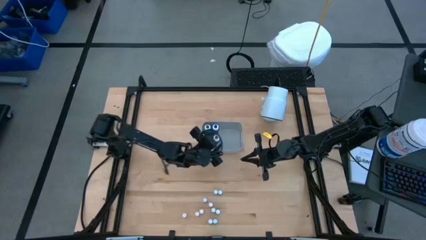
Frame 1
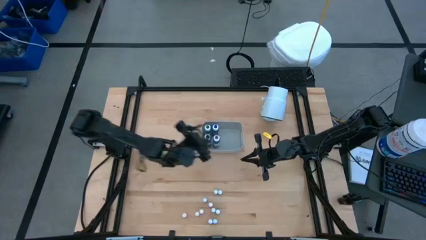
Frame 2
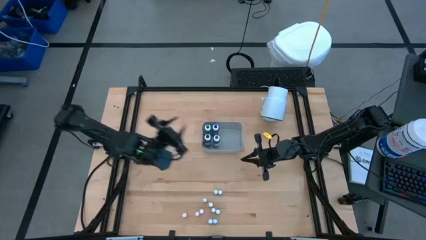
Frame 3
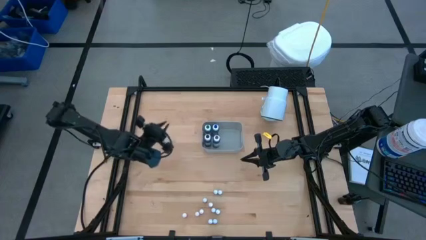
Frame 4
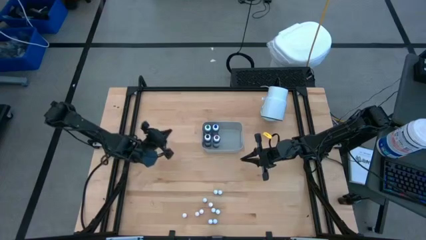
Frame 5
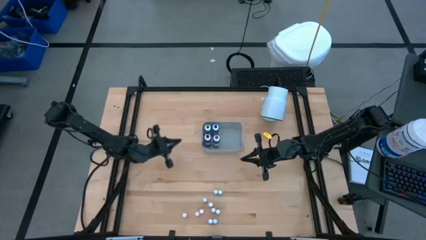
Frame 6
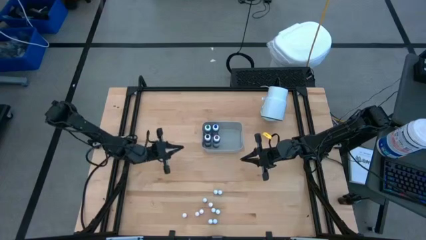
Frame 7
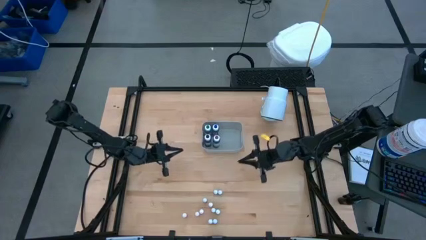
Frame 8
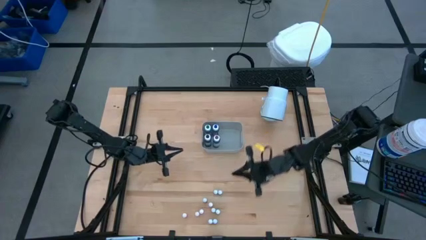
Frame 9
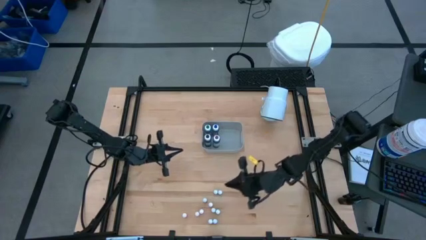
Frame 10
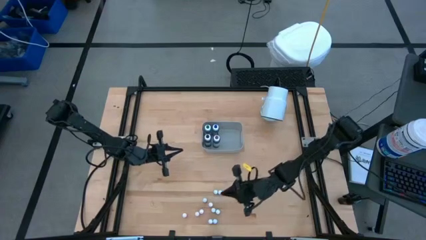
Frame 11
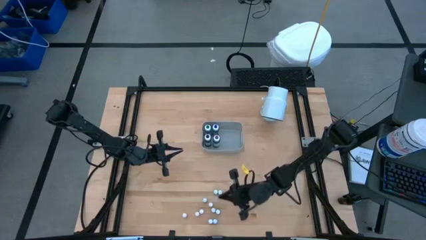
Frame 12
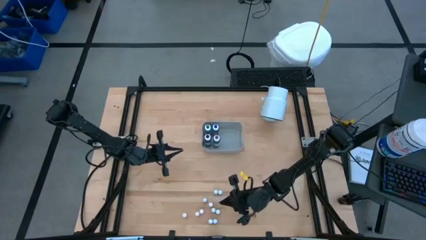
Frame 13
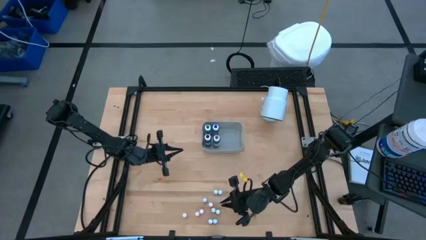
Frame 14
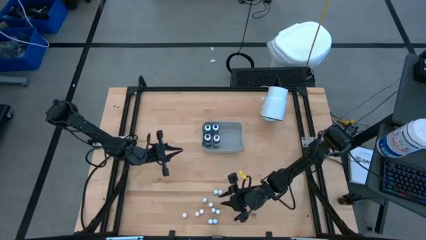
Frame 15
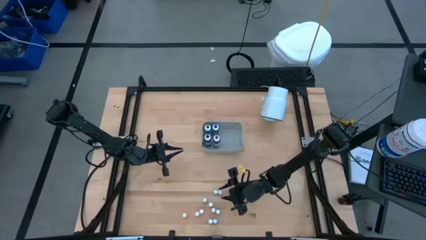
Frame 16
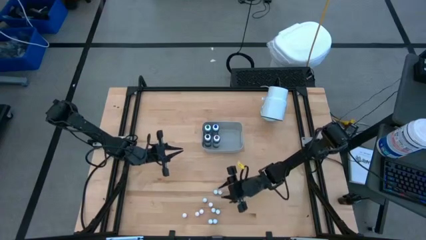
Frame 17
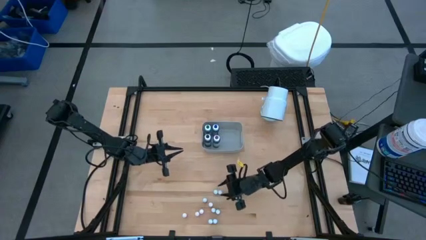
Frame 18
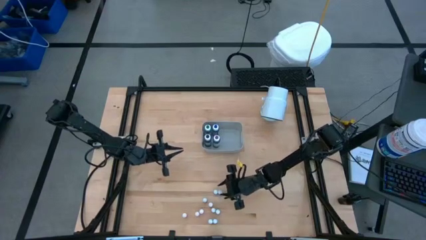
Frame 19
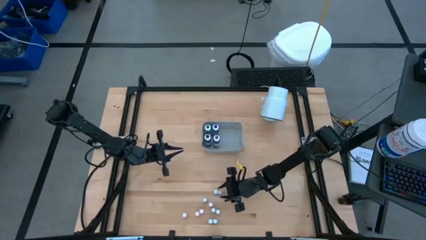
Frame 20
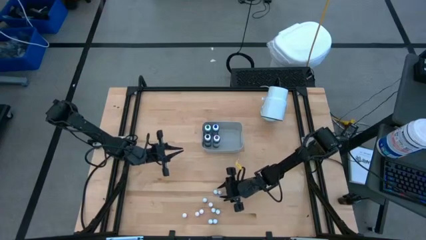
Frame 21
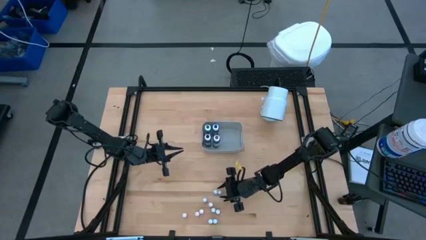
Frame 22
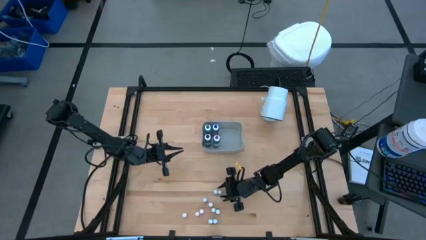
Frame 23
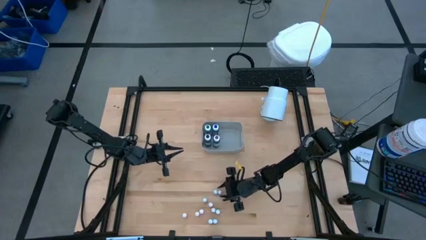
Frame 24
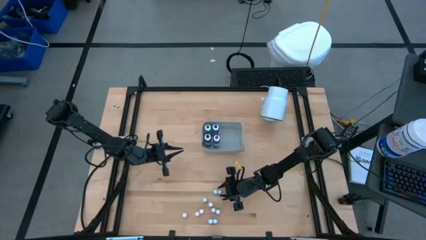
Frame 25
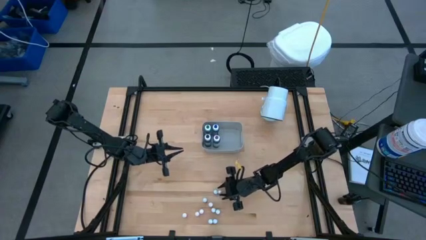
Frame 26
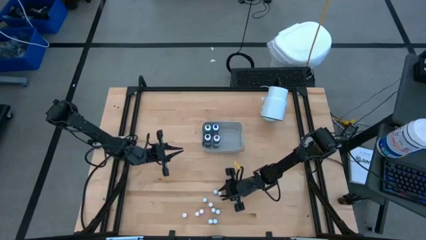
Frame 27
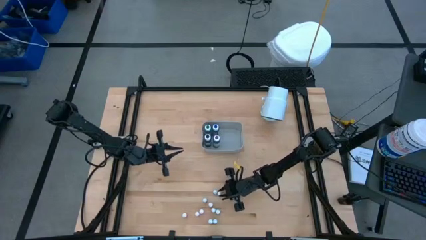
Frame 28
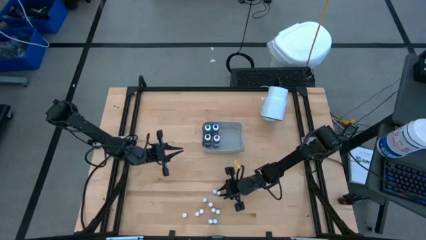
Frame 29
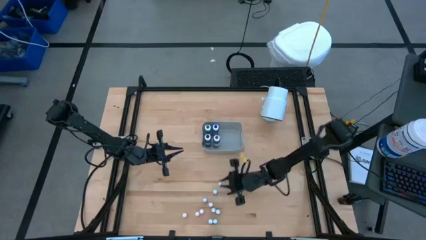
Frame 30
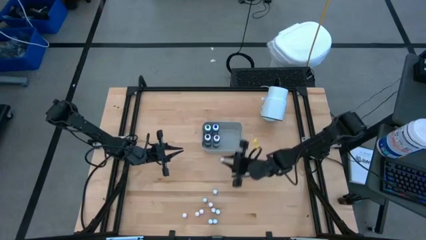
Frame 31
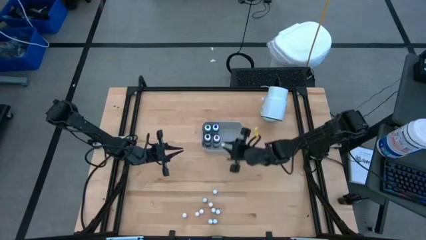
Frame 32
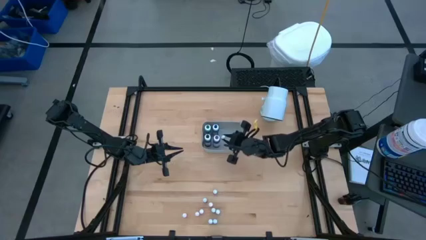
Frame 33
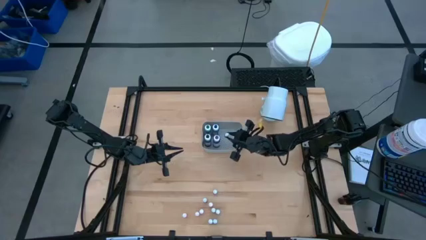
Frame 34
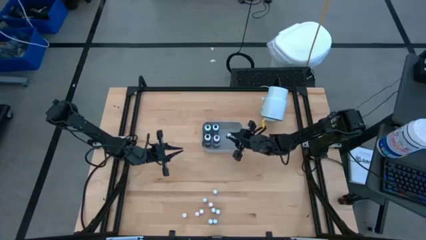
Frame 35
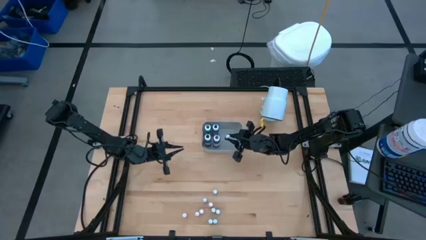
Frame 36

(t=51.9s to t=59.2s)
Task: Pick & Place food coloring
Put the small orange food coloring bottle into the gray bin

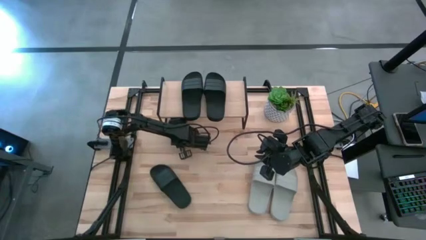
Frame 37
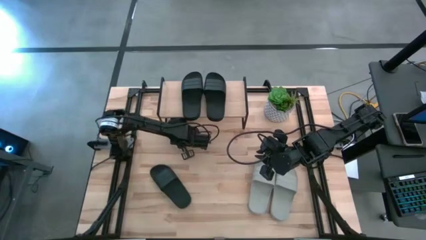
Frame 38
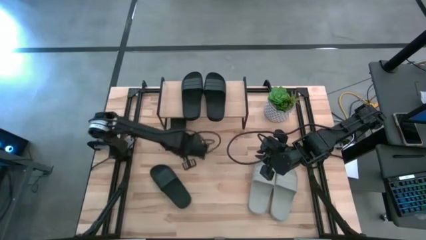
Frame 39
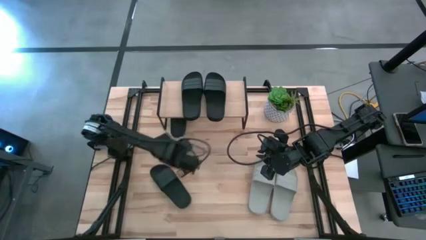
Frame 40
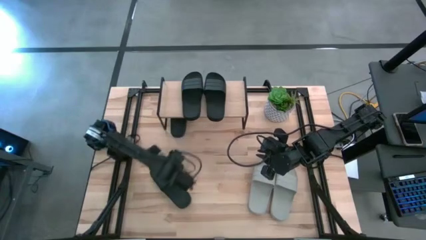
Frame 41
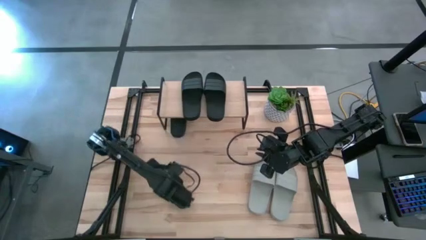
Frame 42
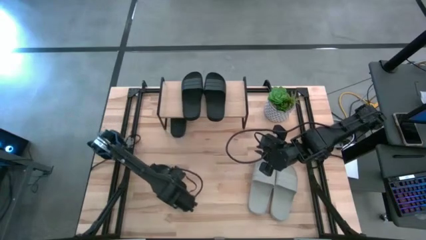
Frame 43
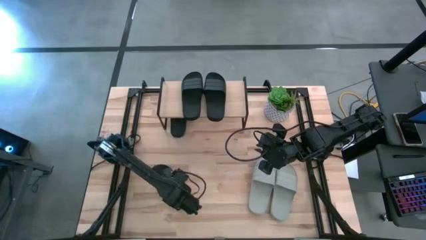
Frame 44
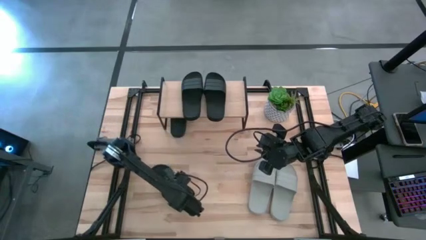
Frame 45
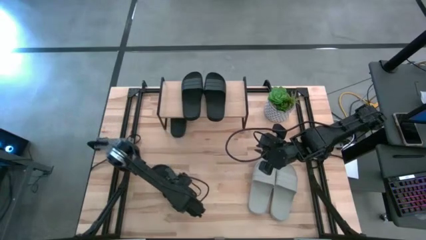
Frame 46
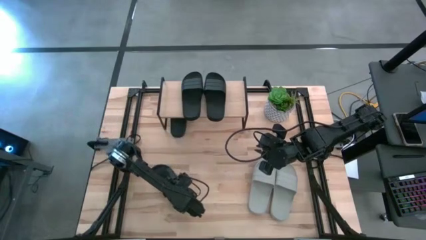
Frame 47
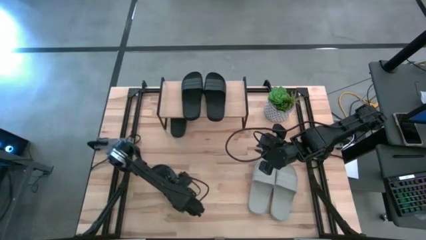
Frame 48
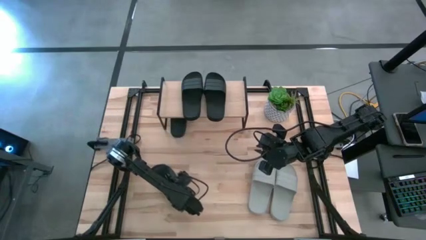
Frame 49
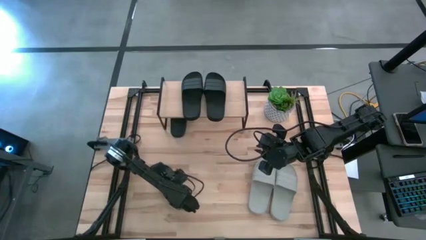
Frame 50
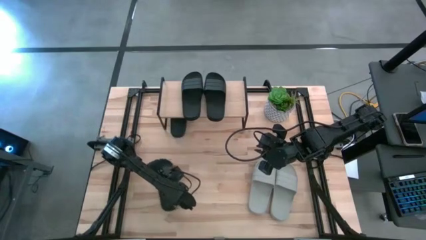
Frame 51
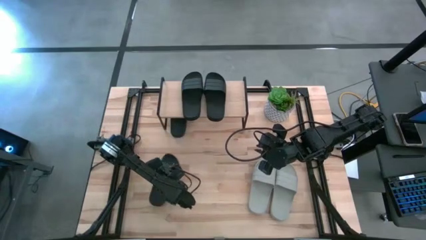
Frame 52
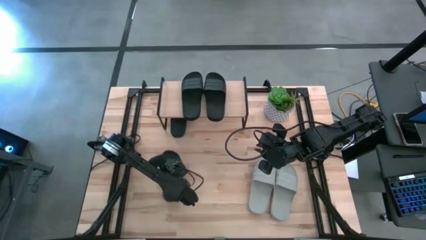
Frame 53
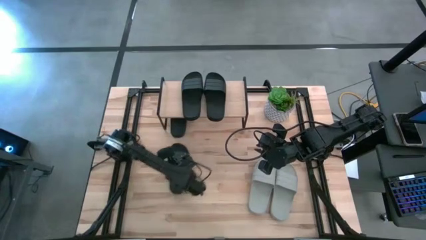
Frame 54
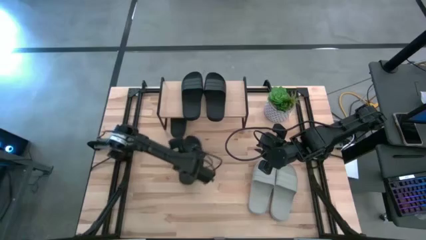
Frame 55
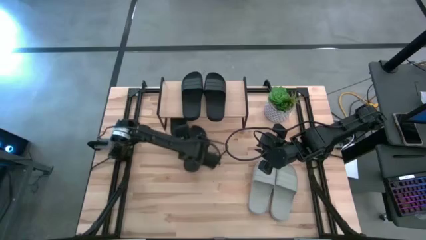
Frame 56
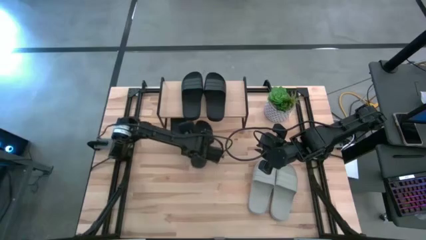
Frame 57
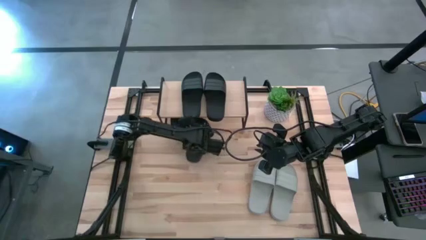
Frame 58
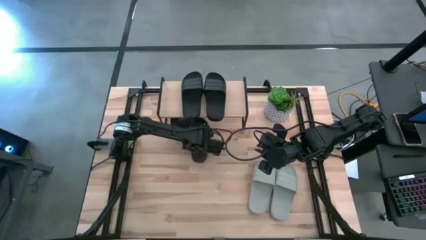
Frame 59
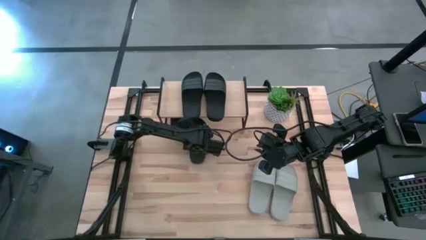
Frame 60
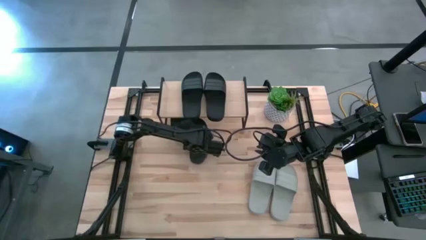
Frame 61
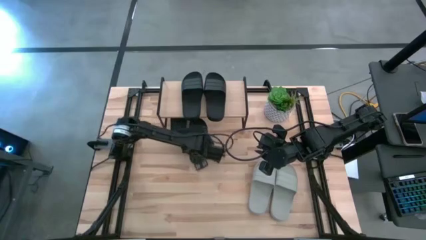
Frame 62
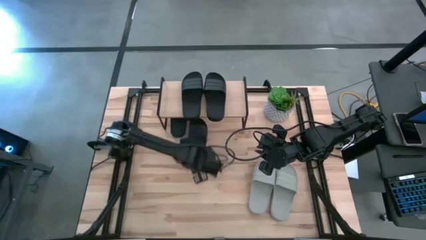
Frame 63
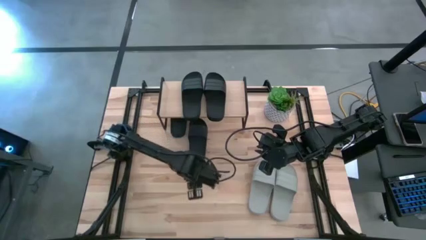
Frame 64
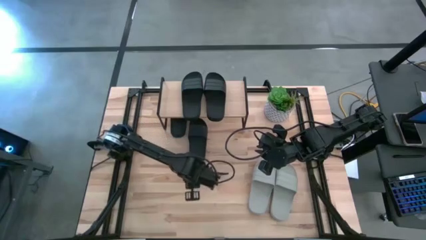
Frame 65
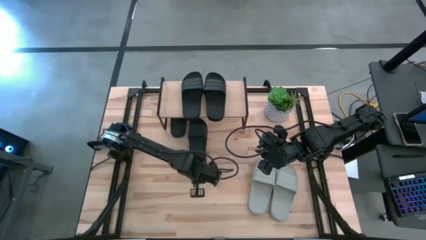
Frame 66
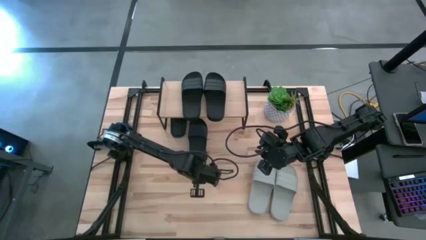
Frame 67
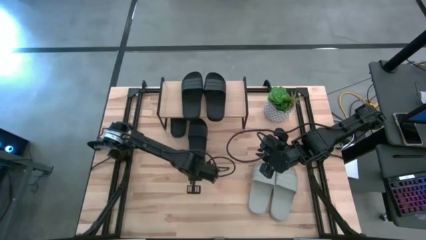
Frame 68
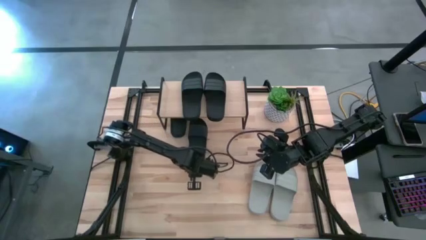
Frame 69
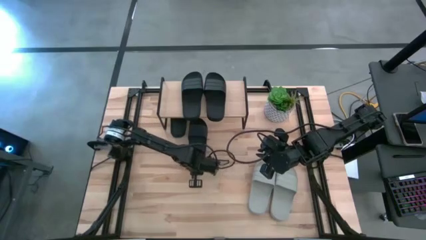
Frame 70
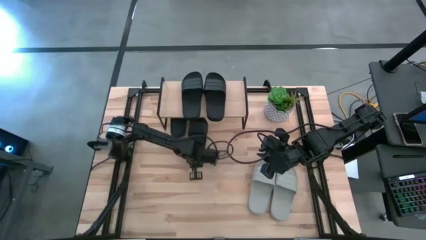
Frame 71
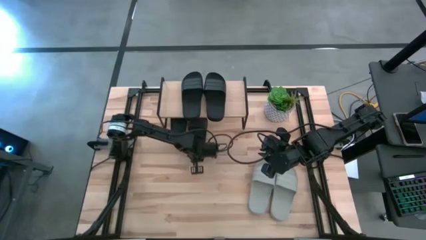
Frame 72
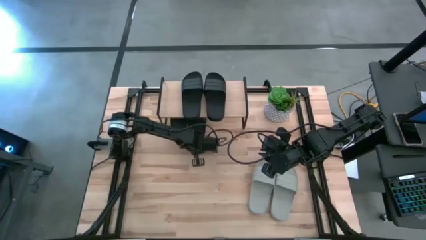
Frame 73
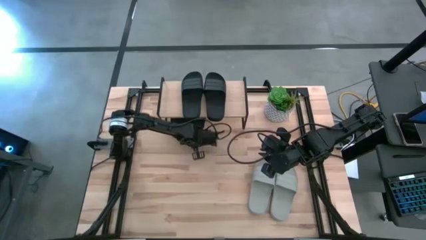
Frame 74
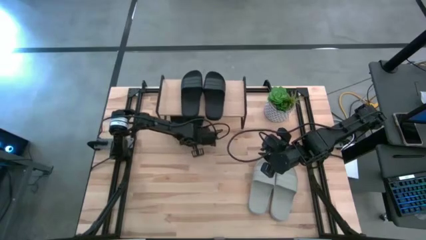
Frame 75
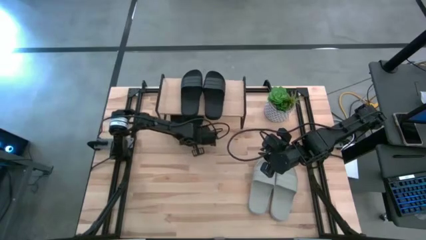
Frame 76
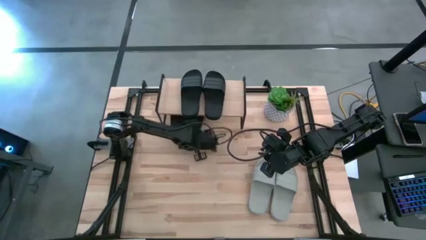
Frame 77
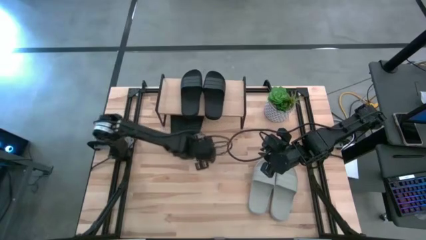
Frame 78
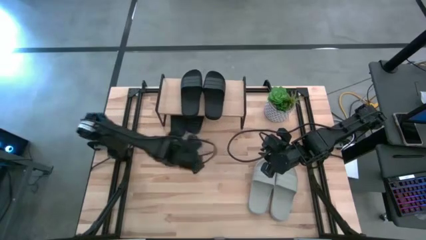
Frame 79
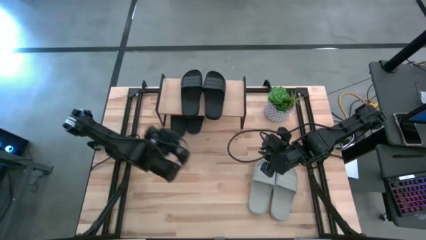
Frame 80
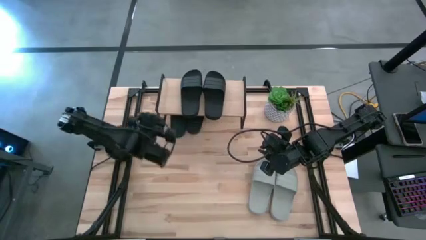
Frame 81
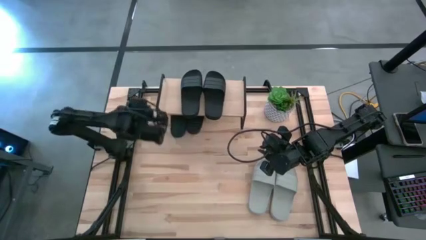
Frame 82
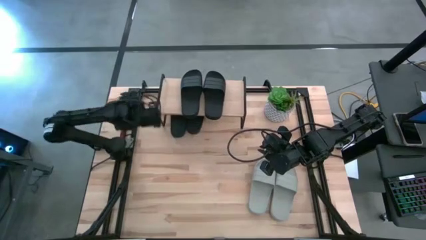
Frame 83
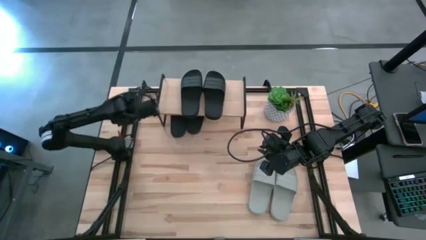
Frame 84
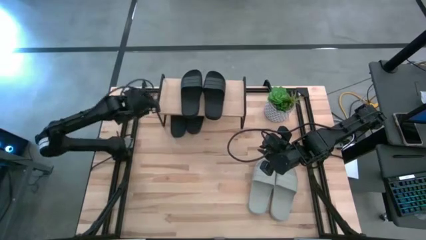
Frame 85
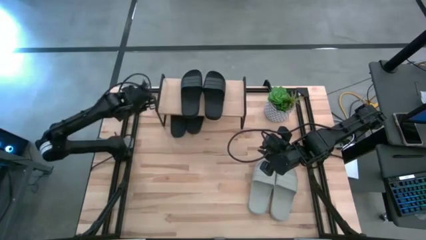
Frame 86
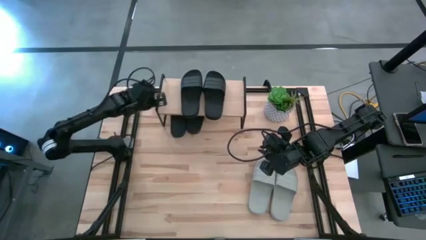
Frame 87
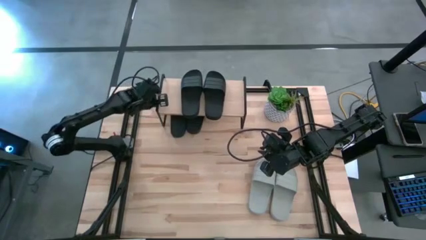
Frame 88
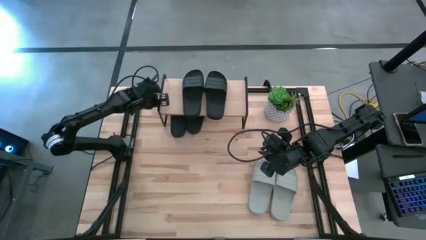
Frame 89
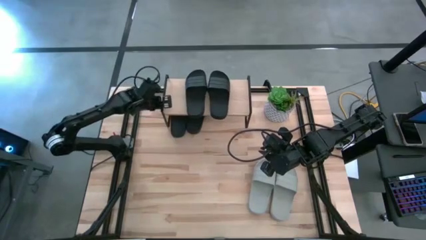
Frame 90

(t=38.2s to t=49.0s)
Task: Pick and place slides into the shelf
Put the black slide under the shelf
